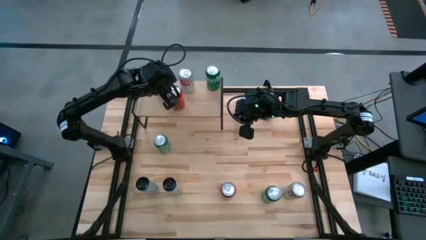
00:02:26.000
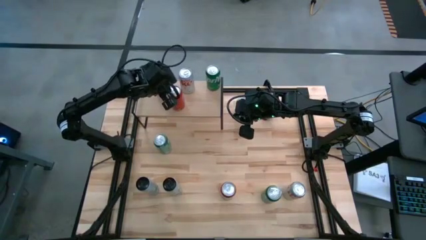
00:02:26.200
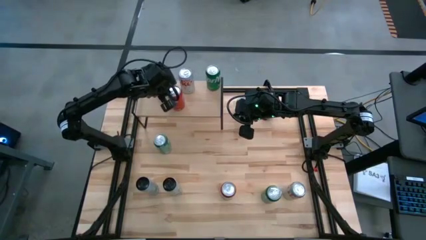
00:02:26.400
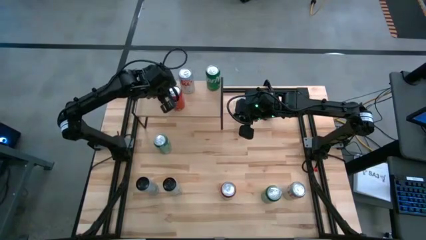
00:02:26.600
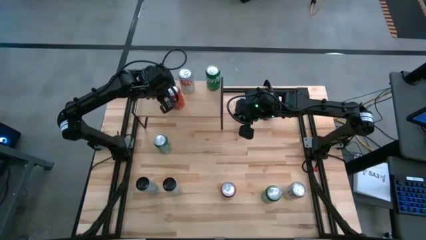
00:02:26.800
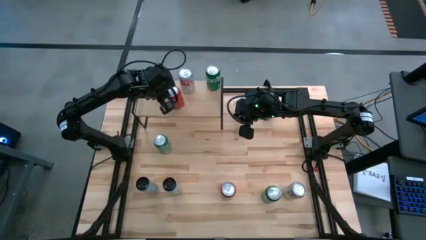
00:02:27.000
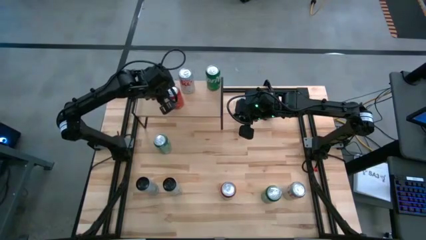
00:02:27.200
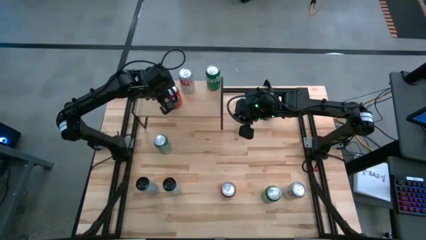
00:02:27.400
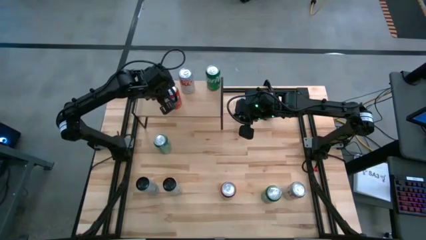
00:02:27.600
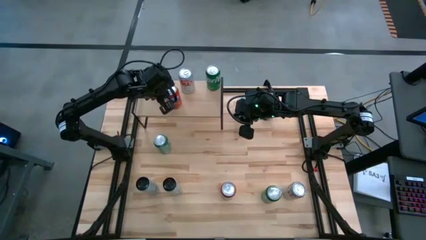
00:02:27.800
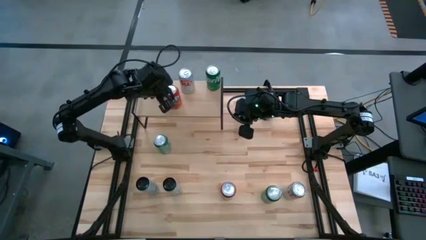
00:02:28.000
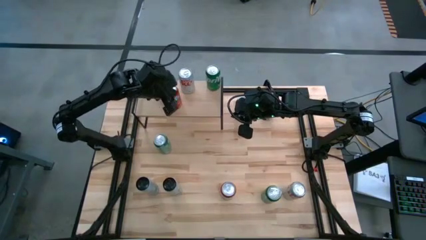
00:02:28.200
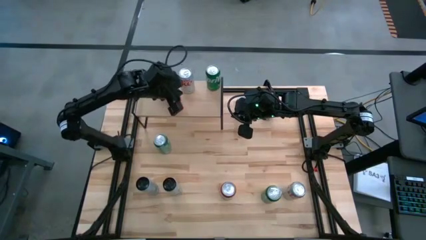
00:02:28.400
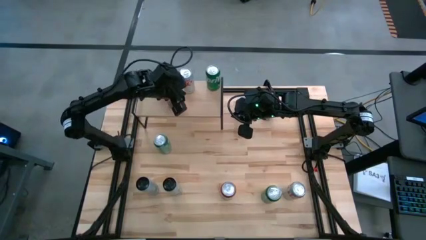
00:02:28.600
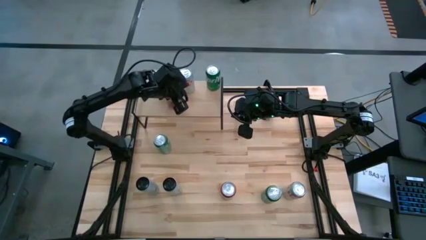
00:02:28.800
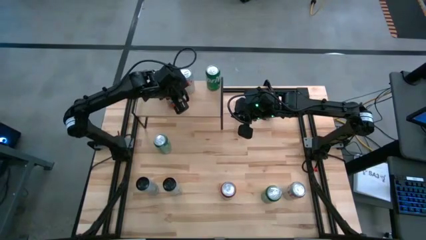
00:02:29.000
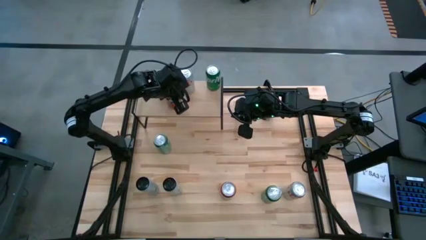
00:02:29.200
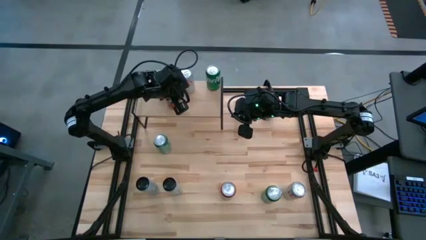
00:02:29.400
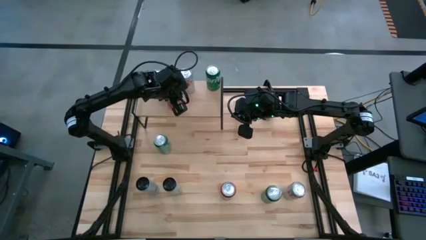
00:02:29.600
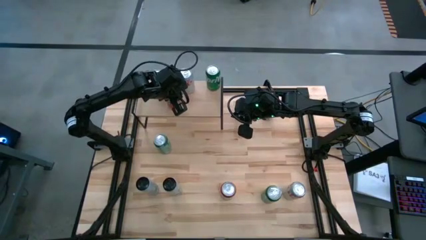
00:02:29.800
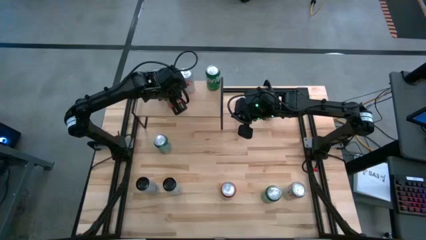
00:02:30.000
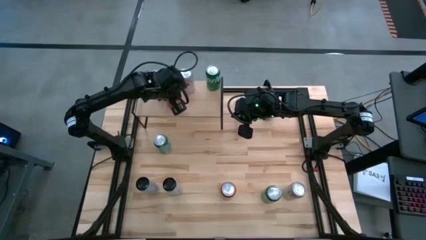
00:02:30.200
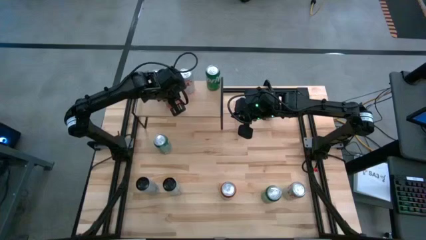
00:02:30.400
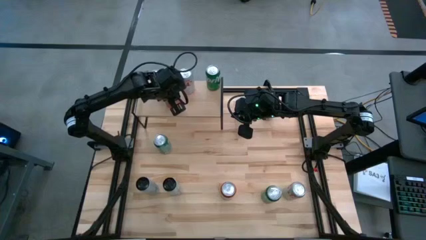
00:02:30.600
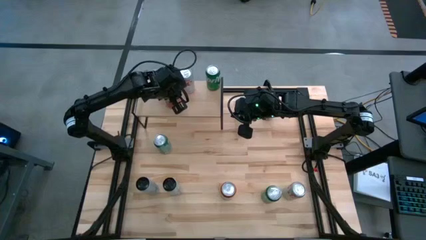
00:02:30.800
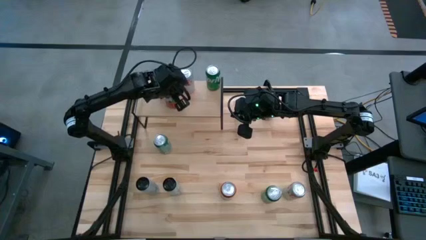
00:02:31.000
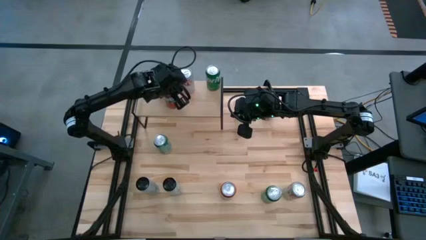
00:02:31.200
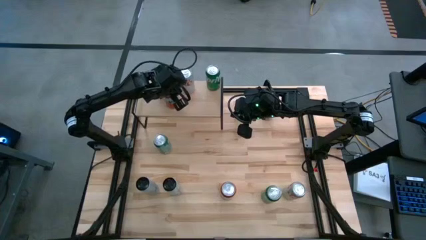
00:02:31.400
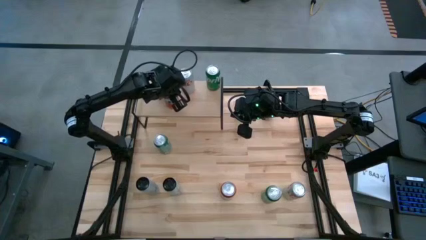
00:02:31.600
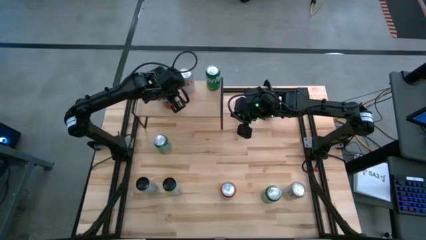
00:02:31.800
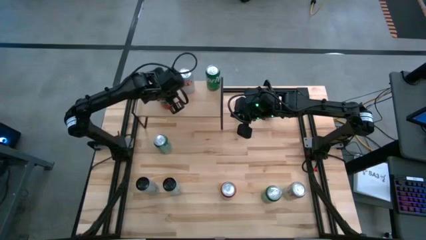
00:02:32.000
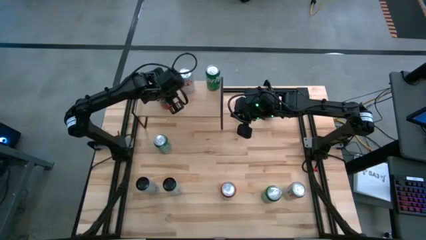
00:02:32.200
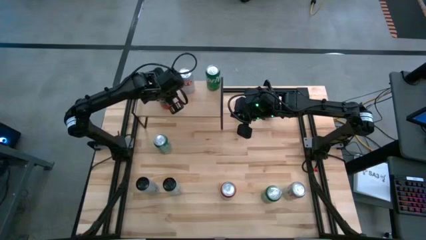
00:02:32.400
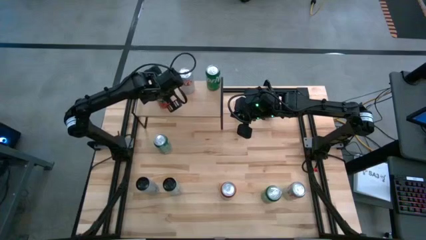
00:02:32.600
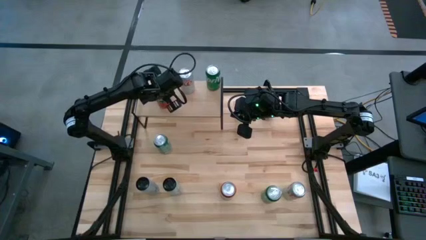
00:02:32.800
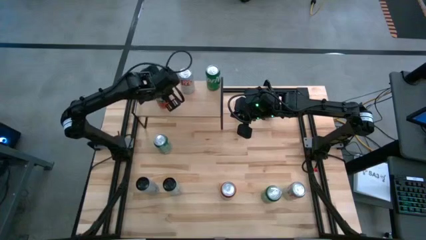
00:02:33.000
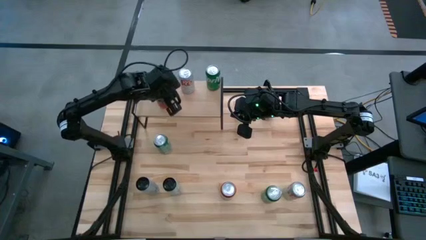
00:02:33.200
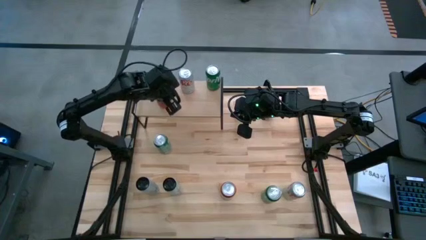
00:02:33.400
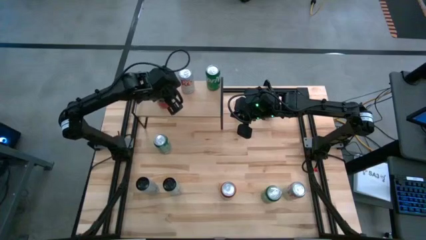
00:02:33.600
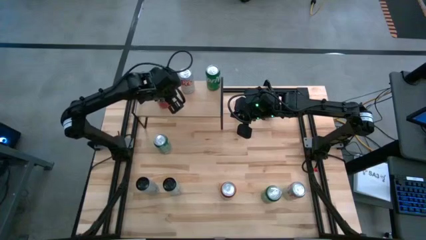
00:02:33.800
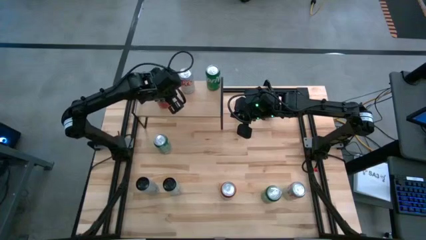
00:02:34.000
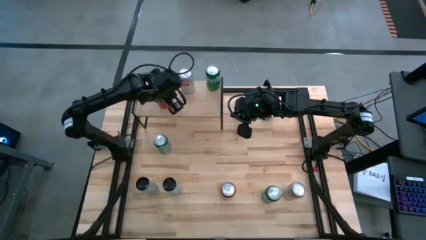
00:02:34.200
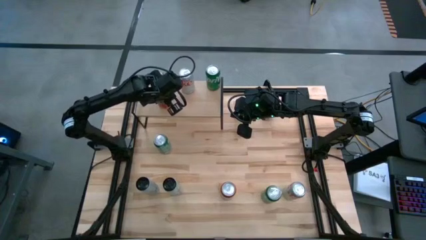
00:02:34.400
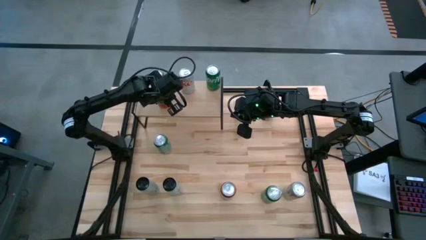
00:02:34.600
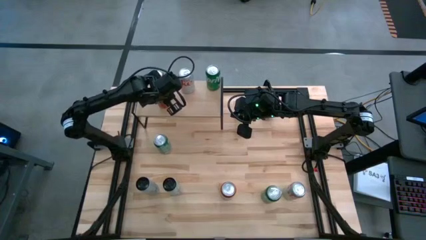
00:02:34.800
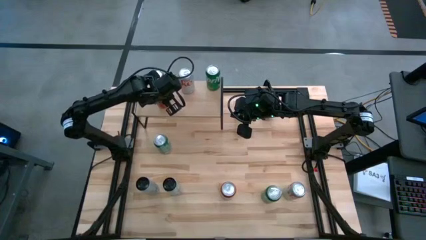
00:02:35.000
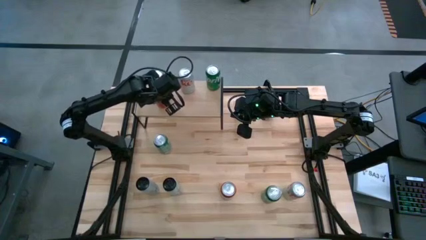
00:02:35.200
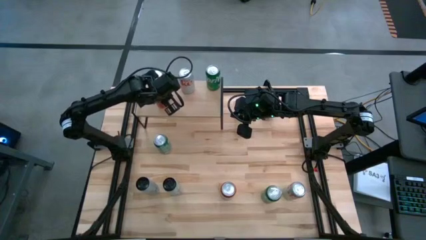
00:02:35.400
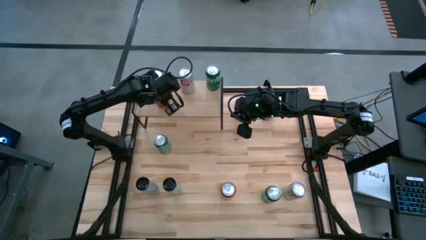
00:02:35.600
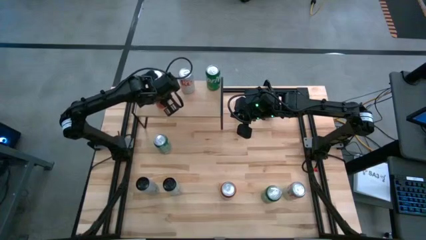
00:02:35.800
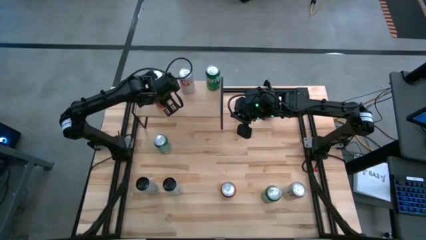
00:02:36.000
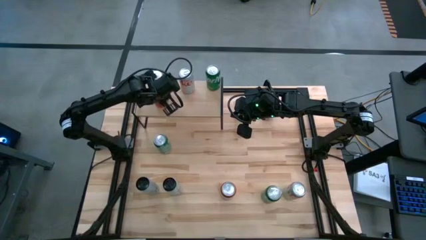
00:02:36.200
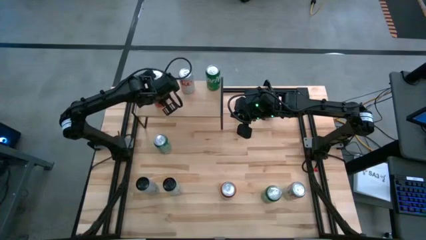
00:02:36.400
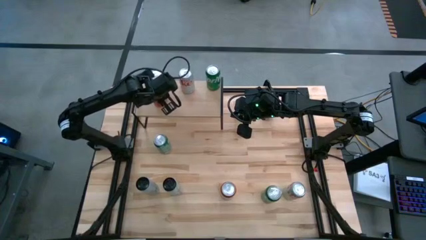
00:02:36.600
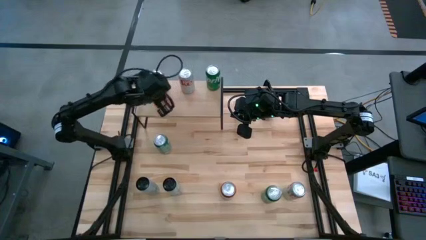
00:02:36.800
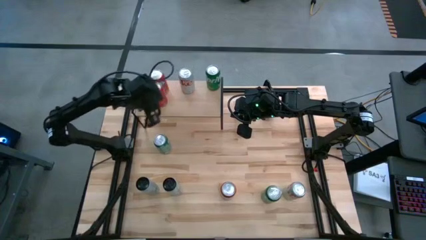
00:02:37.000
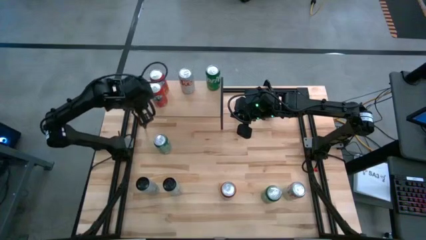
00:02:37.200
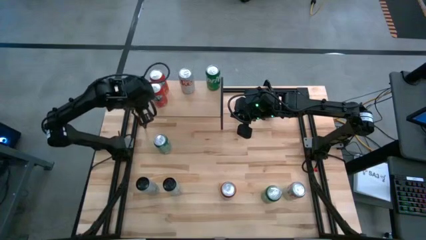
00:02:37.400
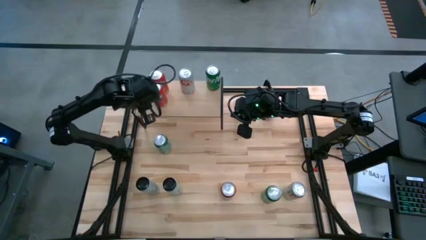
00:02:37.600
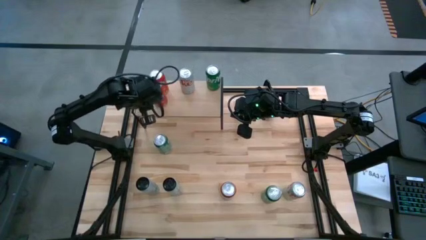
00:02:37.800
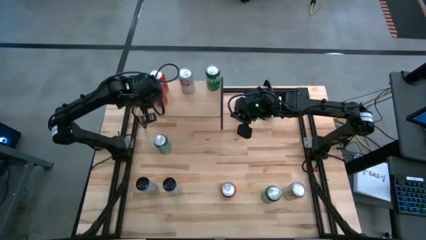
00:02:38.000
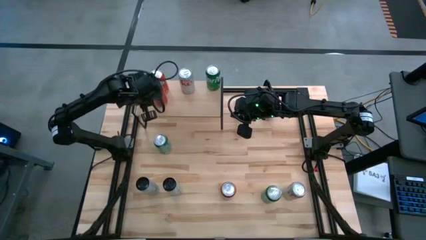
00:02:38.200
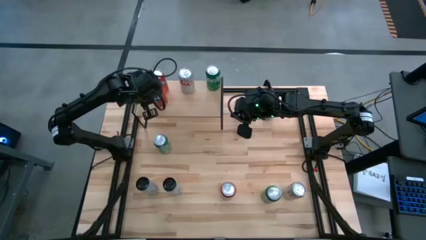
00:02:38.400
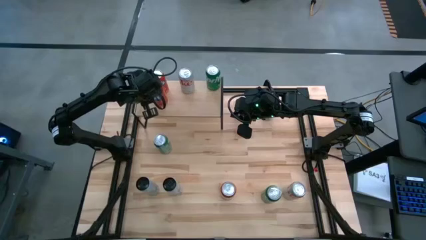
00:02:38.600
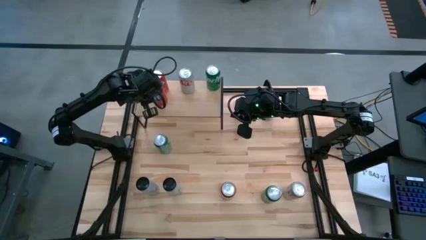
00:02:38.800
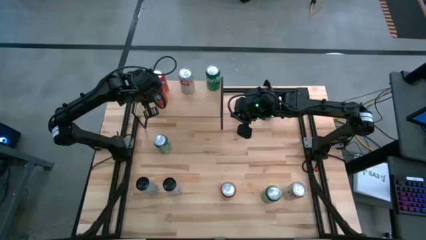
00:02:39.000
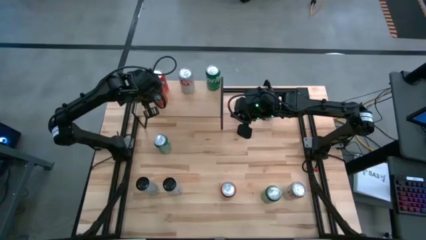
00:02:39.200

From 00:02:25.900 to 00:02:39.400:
Task: Place canned beverage on shelf
Put the top red soda can aligned with the other red soda can on the shelf
